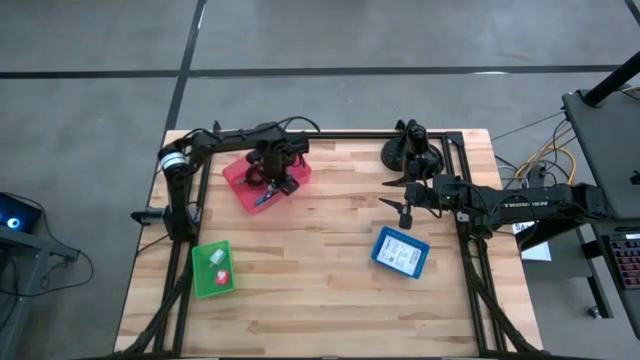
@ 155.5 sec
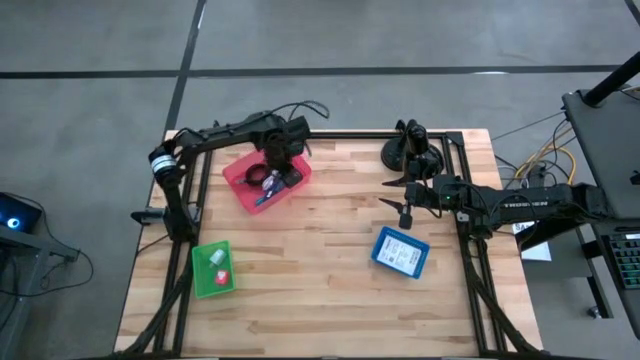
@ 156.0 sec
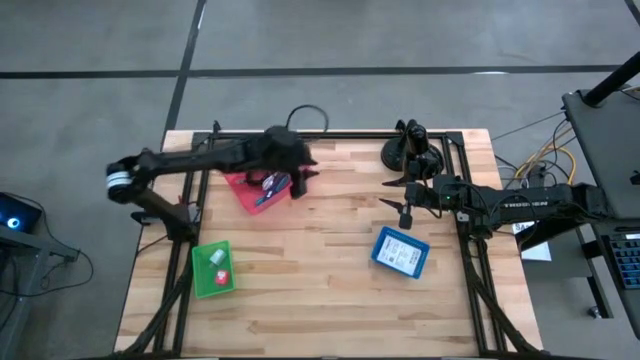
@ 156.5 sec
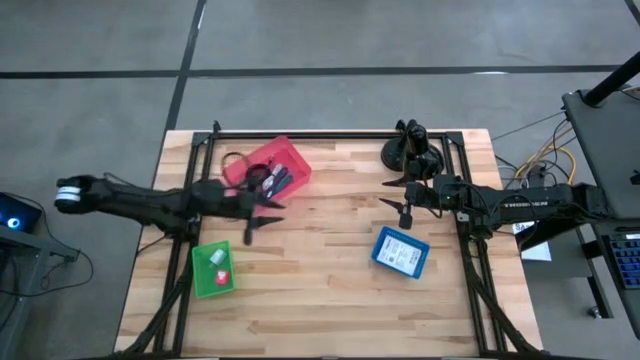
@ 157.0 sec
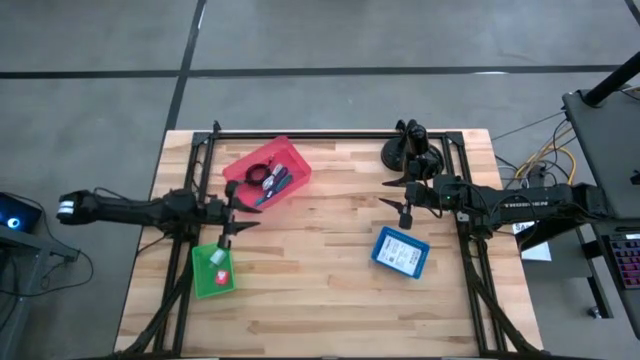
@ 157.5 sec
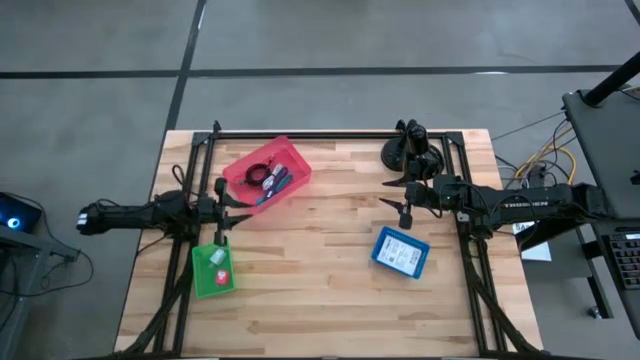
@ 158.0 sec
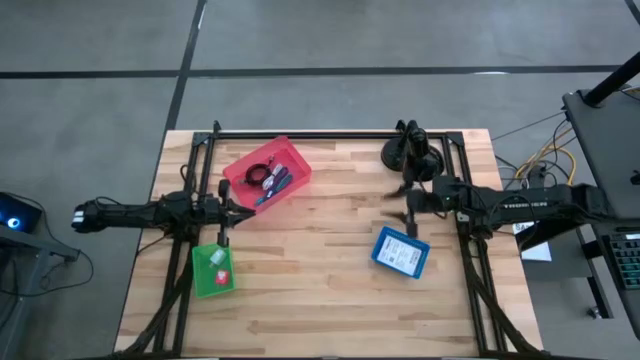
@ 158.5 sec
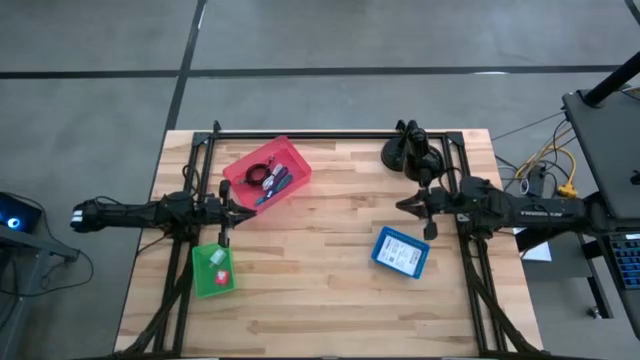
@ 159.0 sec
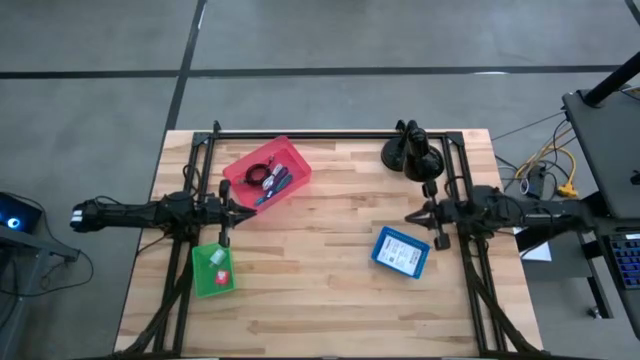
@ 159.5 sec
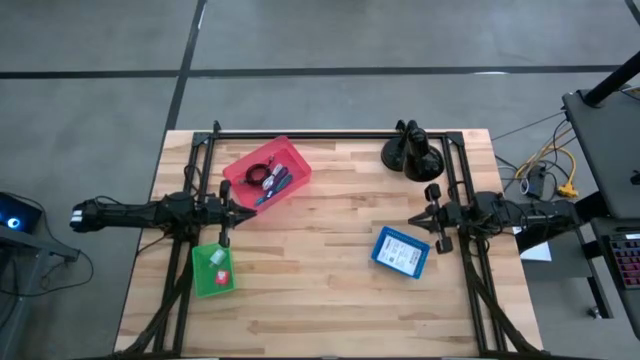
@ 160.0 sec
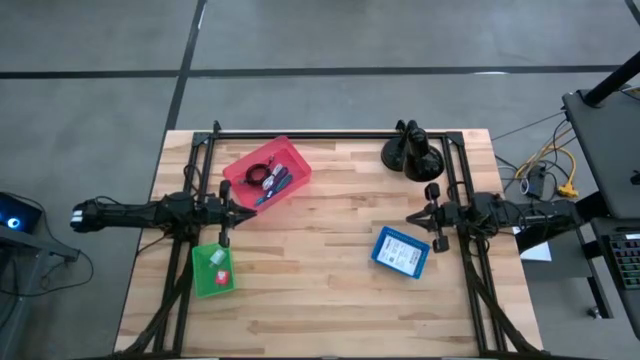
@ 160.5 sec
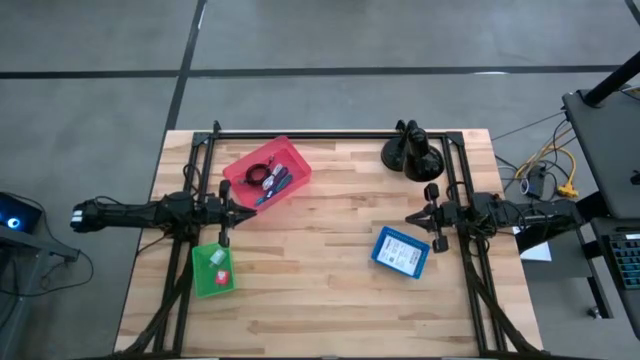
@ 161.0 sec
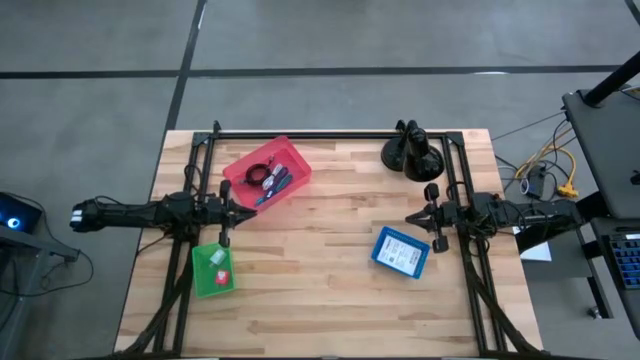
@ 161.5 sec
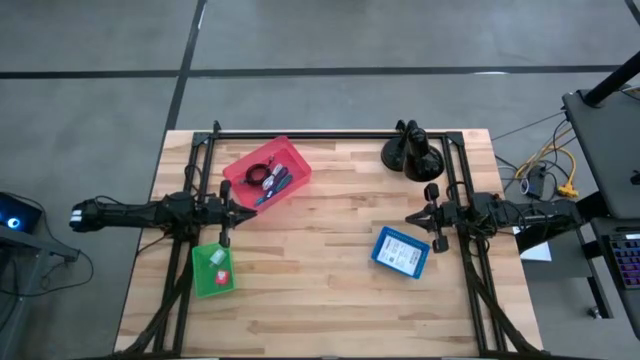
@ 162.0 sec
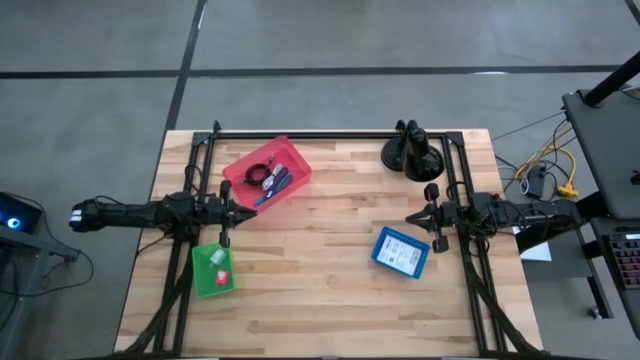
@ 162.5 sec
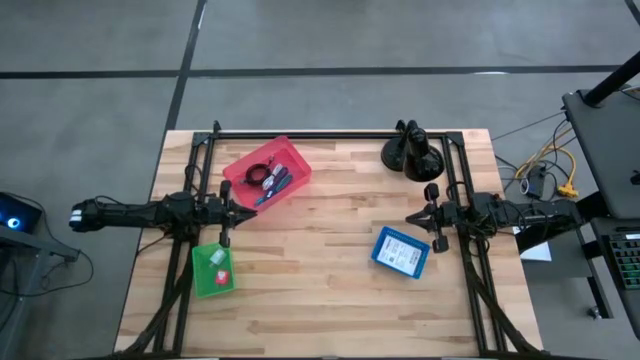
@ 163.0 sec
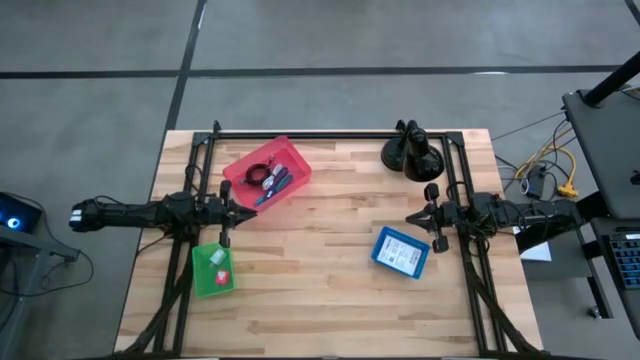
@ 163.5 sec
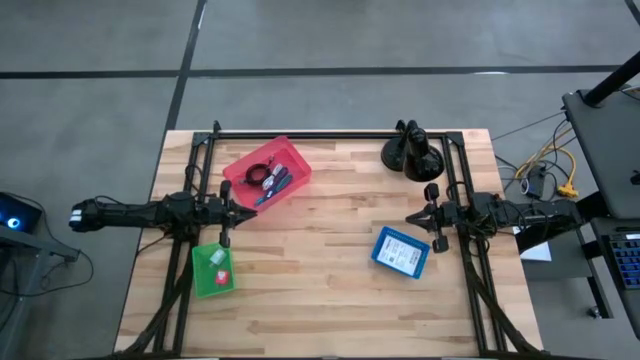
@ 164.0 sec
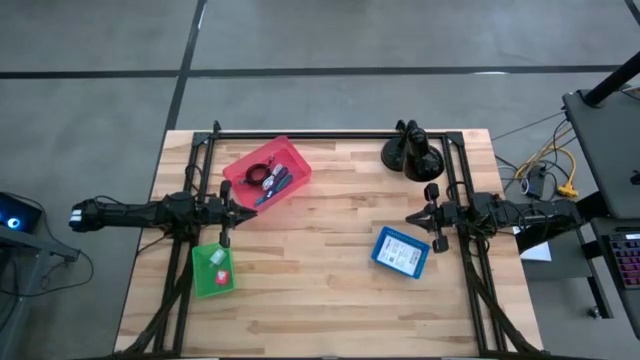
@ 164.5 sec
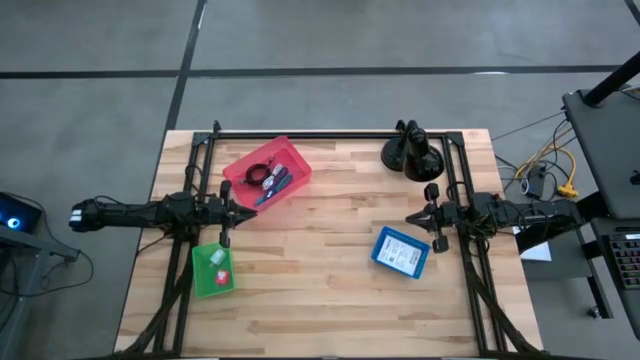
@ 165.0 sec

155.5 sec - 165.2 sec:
Task: Pick and place items into bin
Return to Home Position
